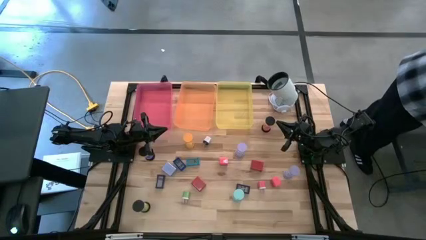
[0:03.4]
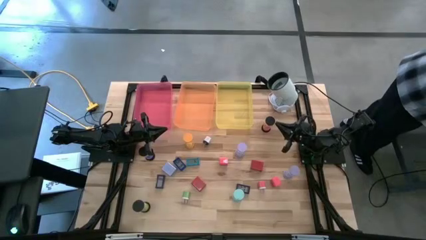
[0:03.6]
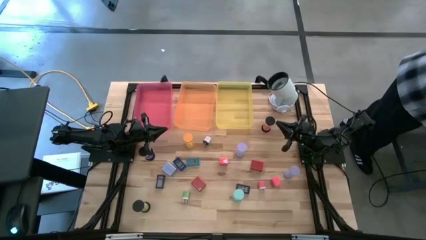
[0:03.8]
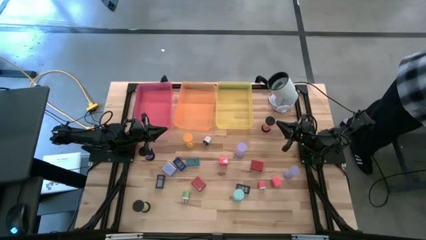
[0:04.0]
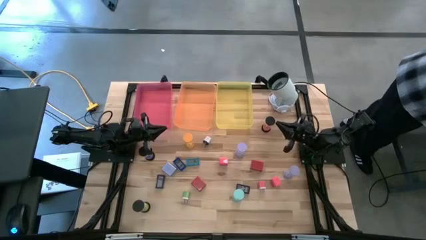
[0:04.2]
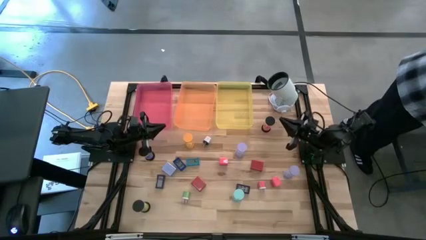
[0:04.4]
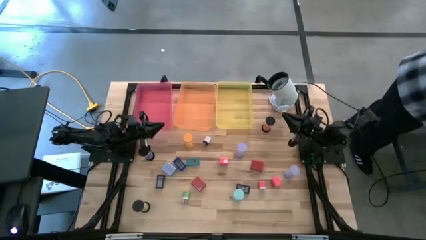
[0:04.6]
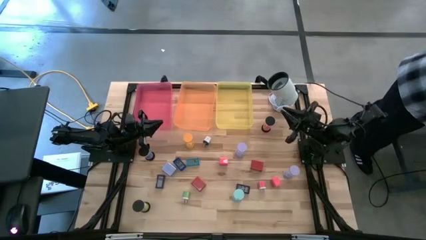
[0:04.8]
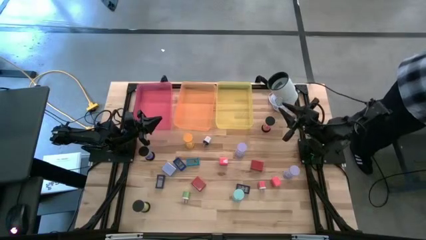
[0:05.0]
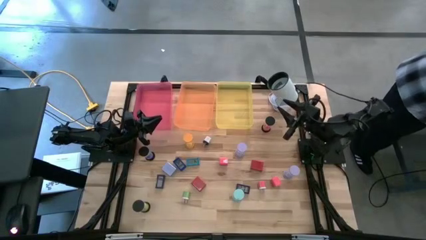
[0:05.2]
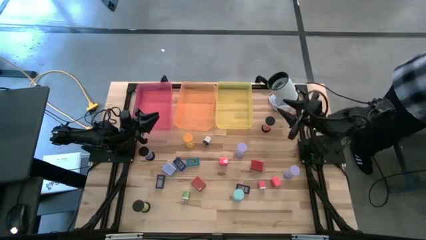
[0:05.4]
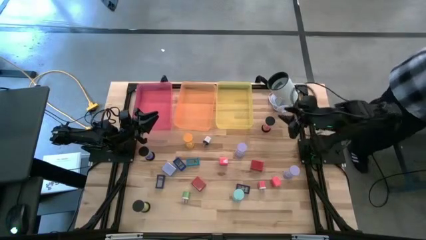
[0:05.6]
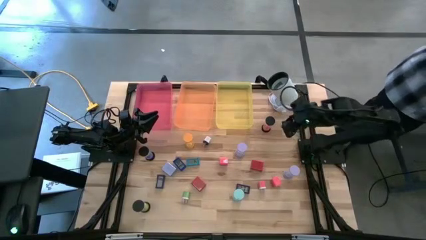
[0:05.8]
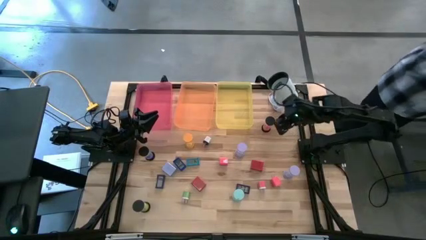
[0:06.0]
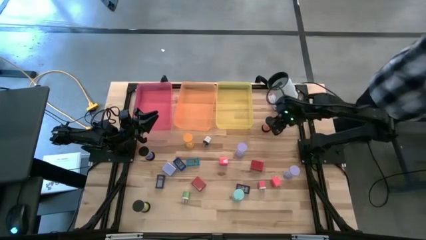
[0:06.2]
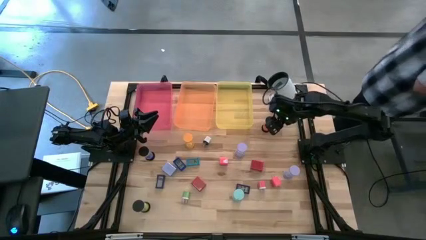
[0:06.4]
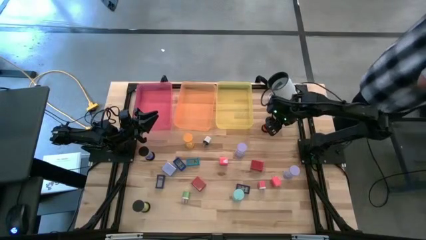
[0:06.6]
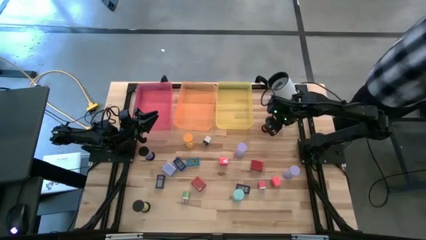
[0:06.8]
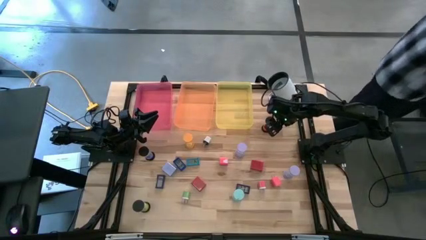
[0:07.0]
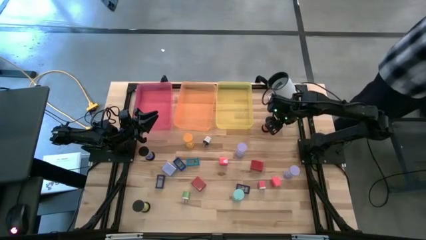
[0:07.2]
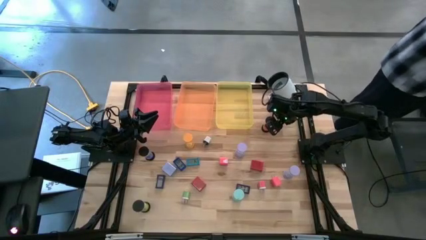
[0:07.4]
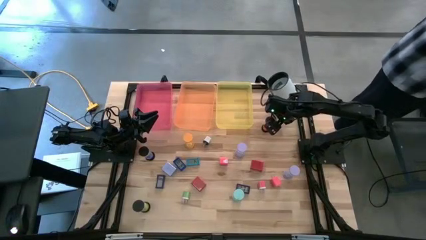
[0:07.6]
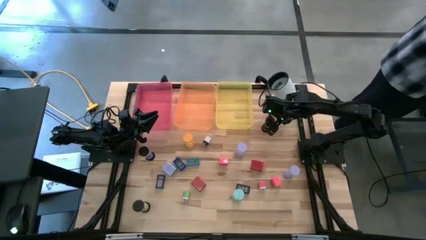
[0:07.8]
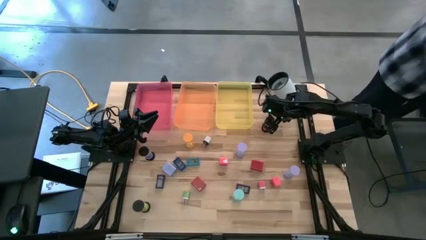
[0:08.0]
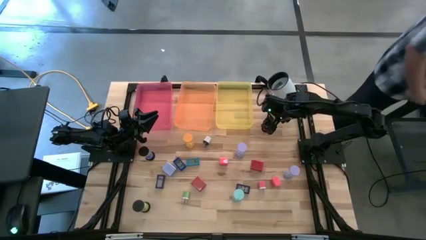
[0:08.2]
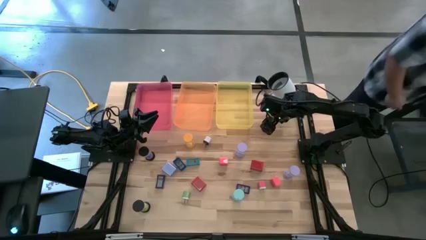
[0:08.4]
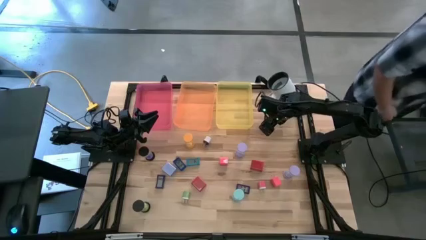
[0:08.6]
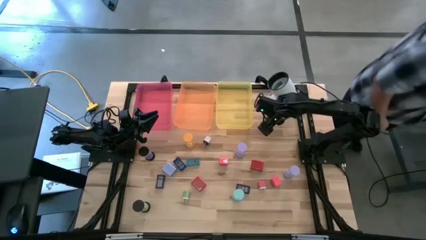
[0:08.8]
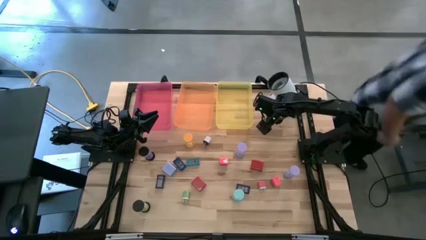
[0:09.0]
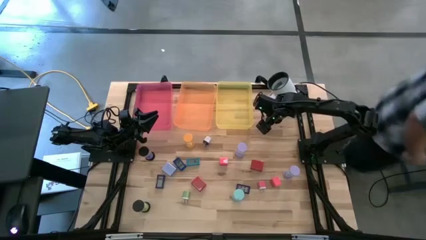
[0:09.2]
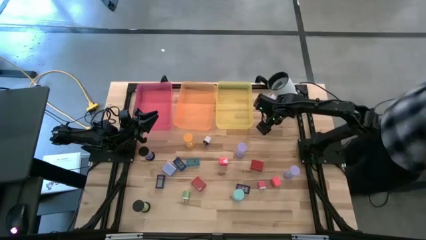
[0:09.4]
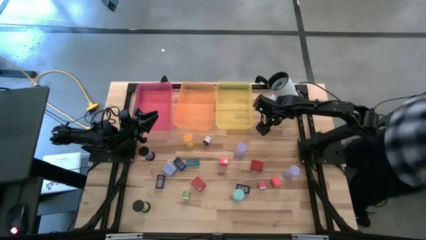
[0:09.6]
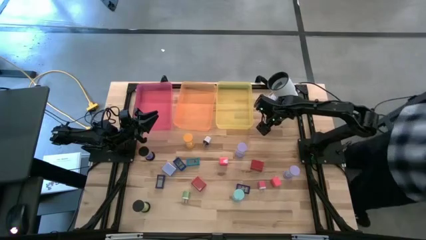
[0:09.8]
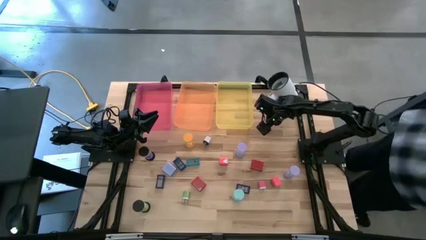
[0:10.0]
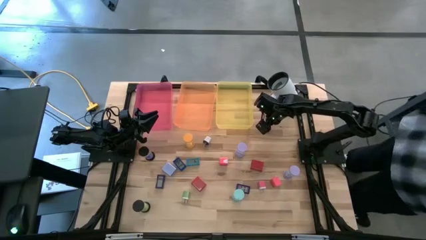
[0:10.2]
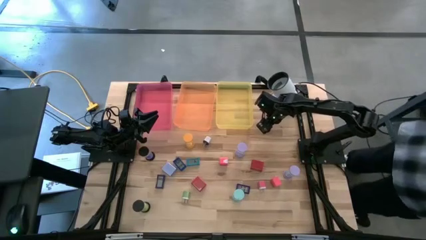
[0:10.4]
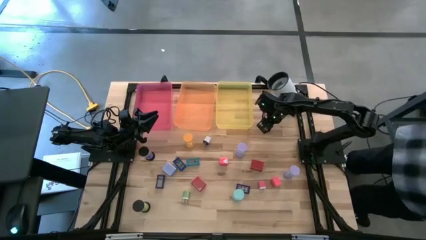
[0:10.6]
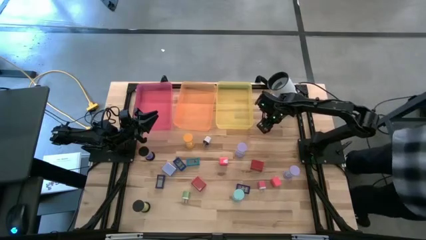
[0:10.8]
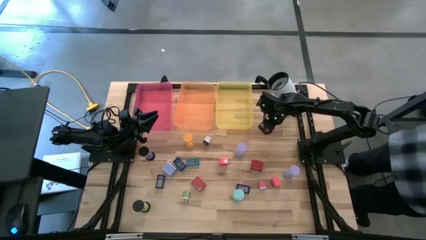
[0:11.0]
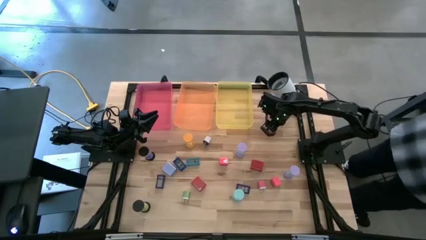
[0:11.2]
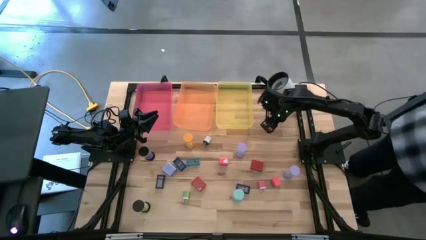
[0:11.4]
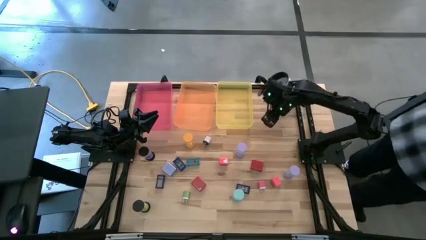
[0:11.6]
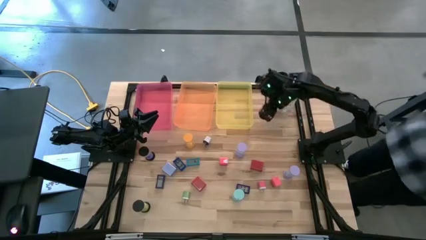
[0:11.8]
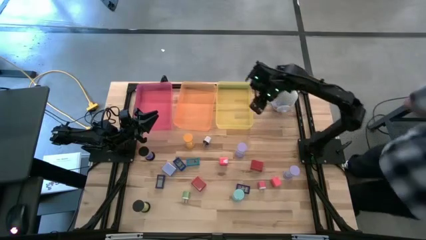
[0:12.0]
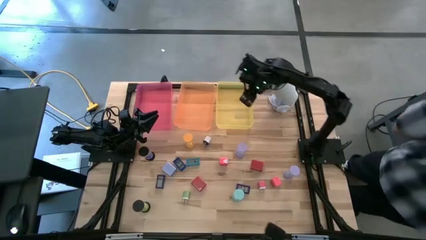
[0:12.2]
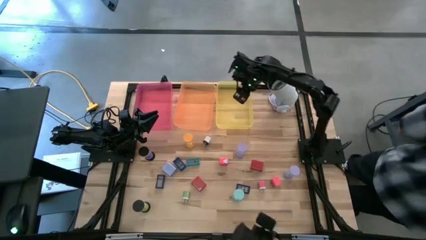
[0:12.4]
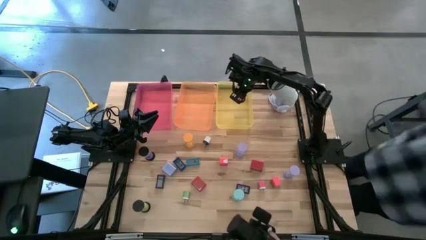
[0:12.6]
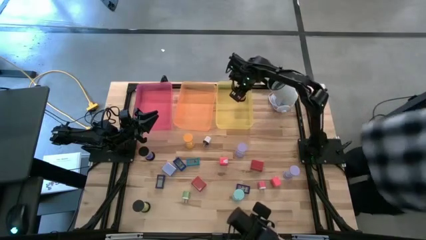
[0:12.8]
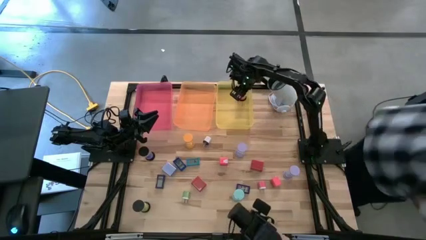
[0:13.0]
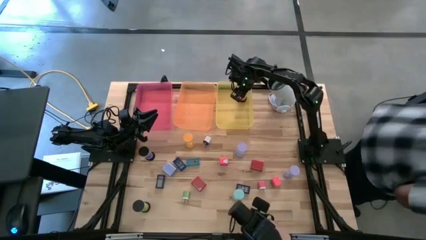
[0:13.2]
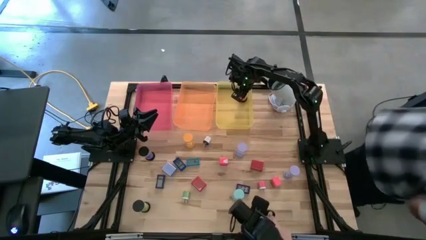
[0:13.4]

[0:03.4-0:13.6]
Task: Pick & Place Office items
Put the pink hourglass into the yellow bin

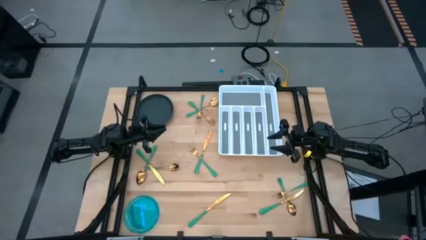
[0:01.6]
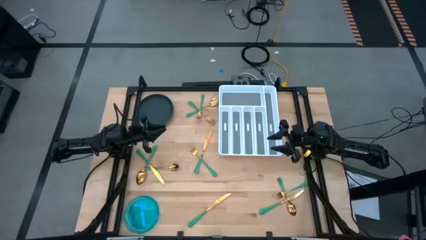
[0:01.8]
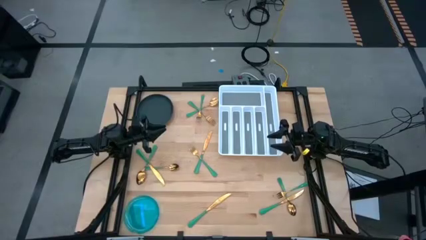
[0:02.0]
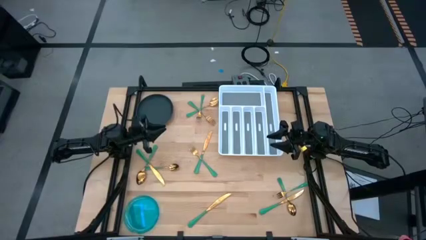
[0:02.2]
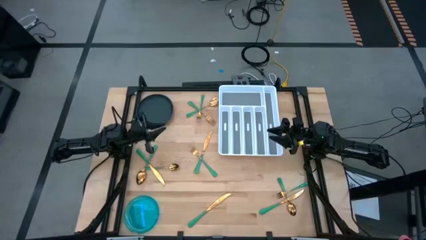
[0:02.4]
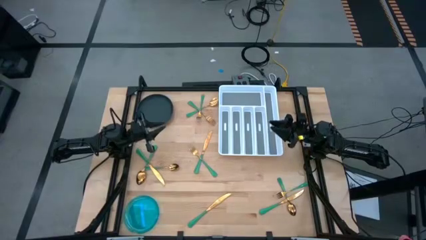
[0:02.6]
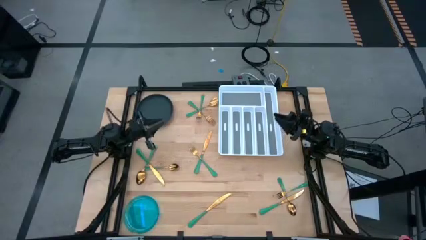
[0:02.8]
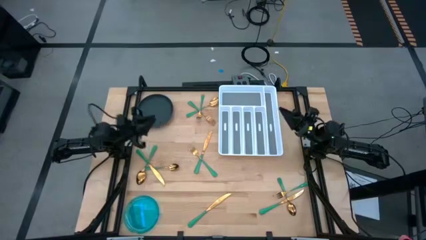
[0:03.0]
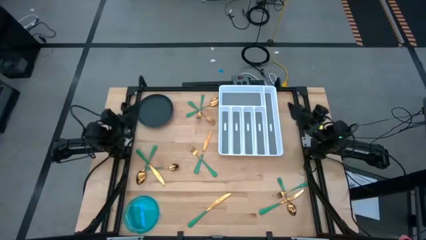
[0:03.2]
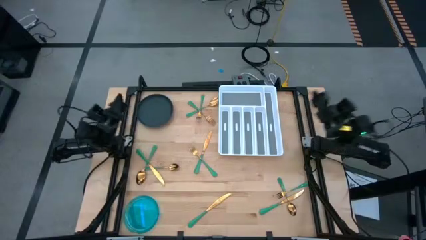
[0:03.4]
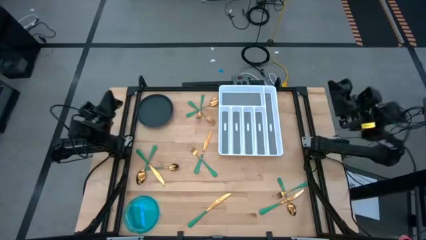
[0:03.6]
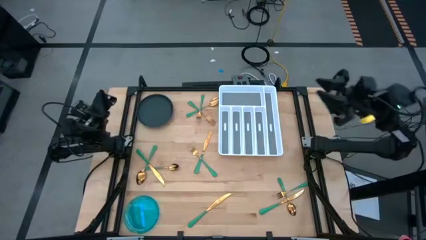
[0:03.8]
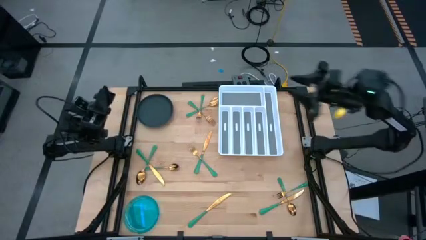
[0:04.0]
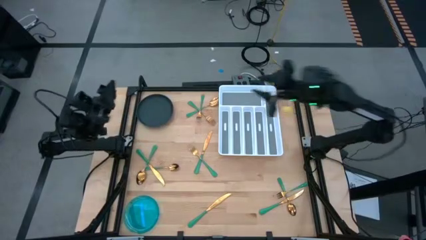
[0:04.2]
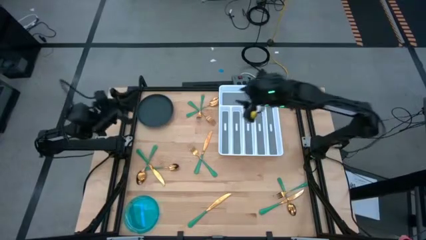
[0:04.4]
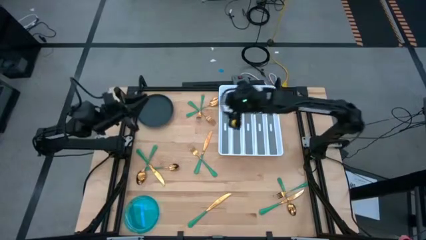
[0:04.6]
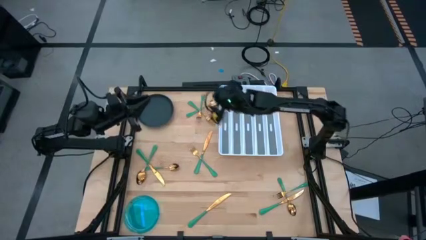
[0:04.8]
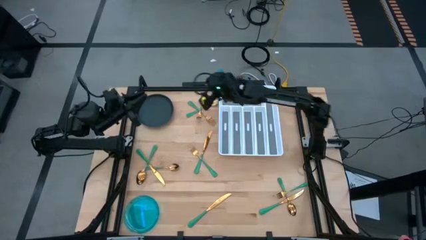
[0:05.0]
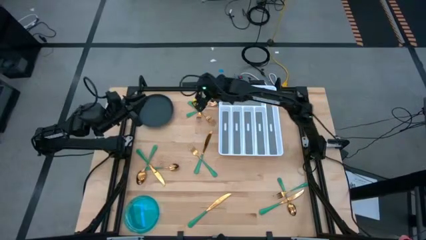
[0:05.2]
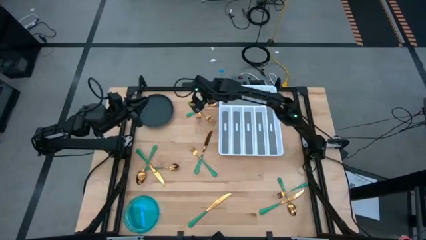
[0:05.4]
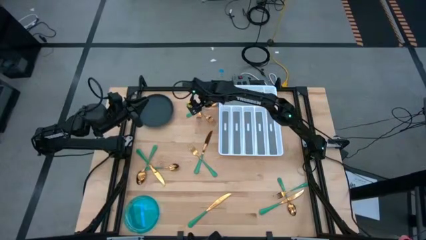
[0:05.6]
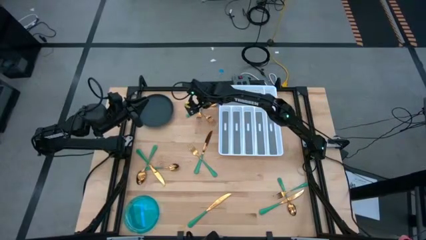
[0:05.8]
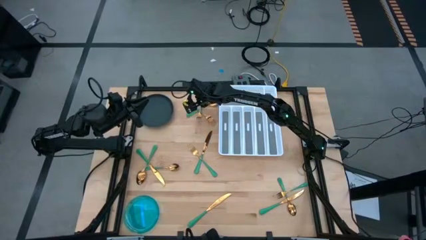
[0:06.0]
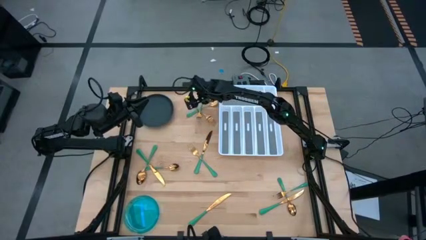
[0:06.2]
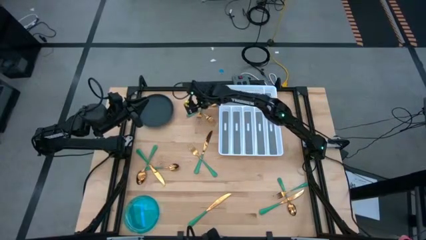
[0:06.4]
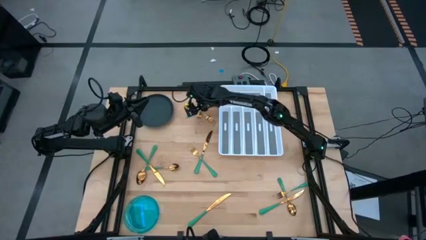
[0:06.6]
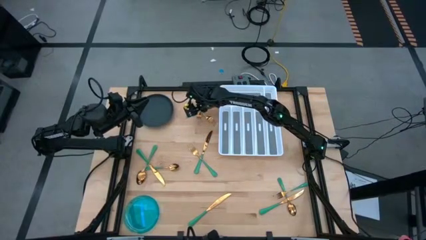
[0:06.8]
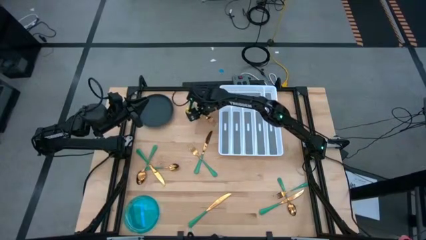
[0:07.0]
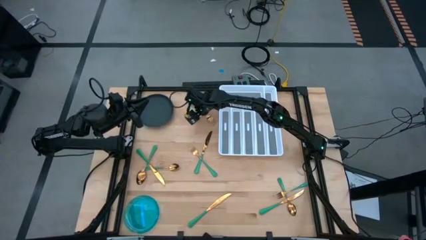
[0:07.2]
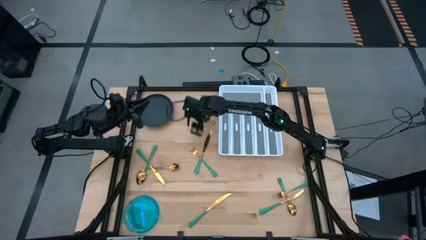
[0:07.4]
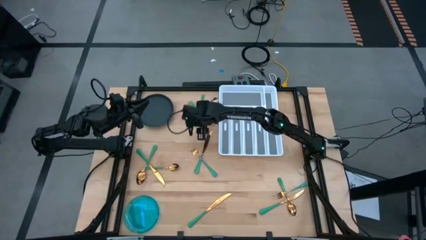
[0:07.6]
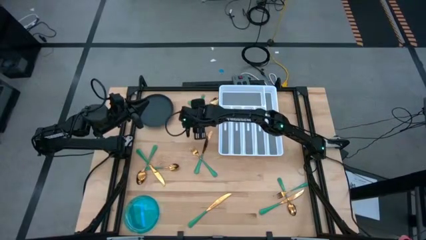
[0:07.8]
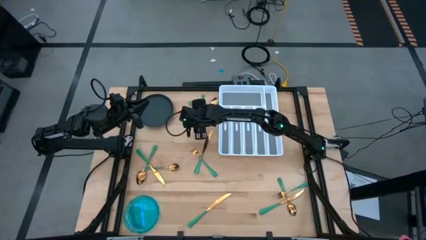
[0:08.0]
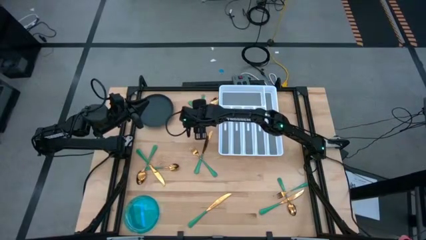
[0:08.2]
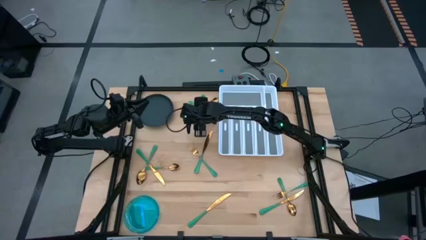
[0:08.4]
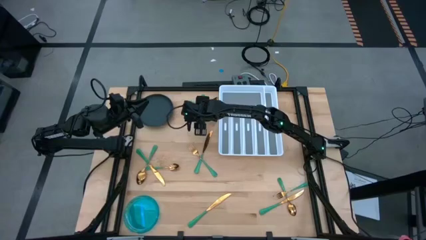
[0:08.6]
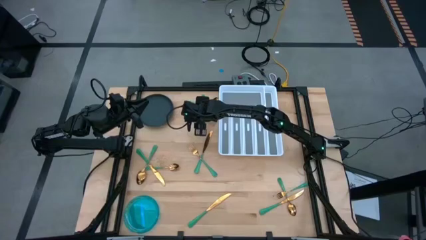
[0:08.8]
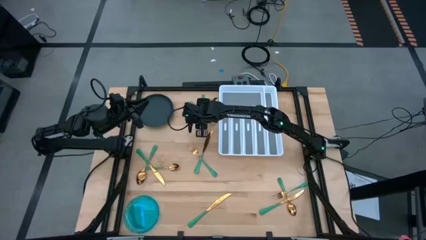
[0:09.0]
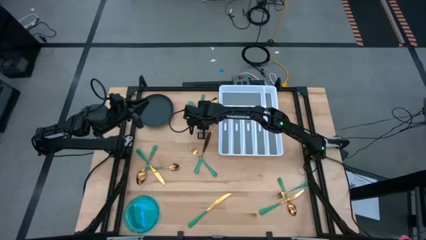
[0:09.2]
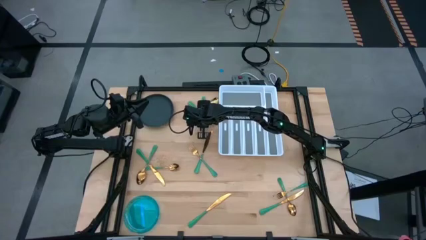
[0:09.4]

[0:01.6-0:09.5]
Task: Sort silverware
Put the green fork into the silverware tray
